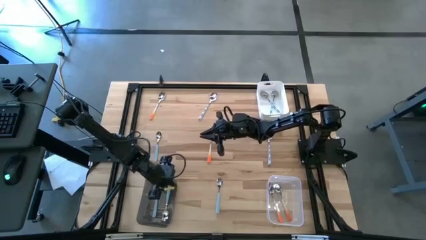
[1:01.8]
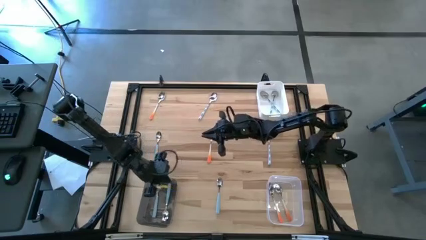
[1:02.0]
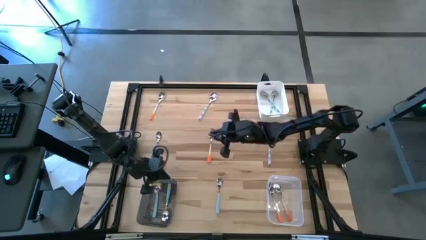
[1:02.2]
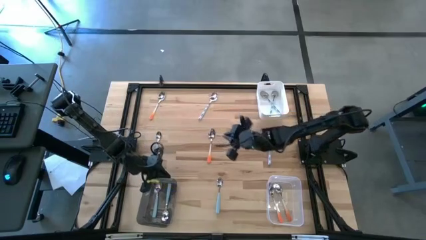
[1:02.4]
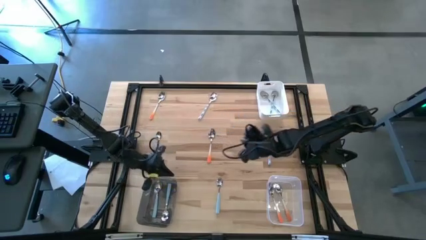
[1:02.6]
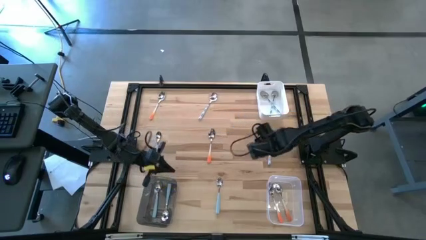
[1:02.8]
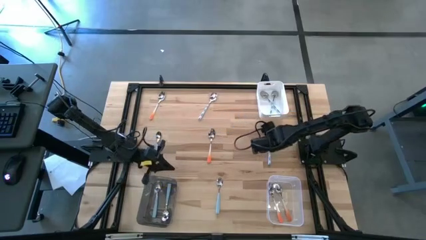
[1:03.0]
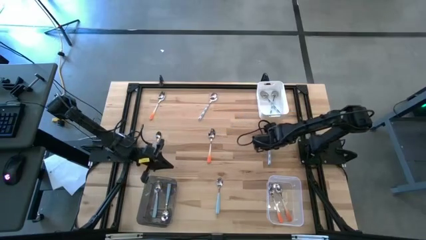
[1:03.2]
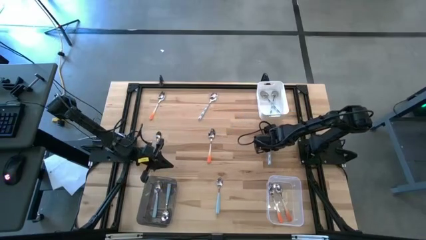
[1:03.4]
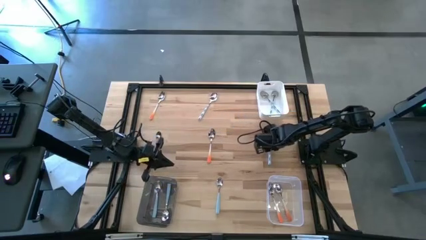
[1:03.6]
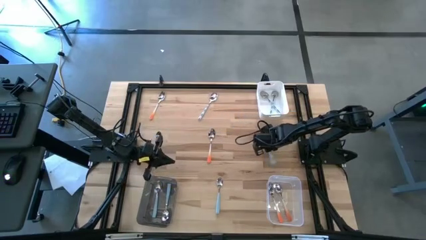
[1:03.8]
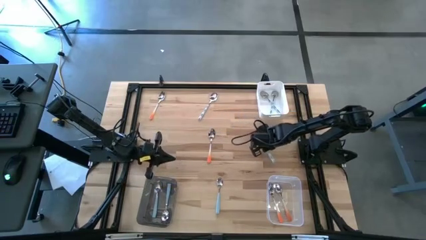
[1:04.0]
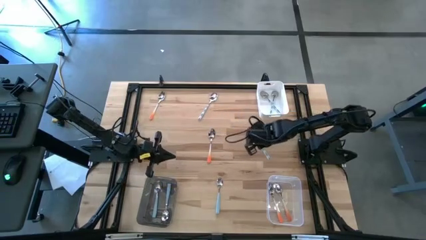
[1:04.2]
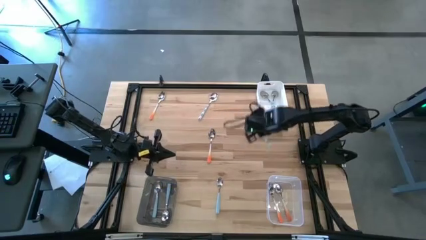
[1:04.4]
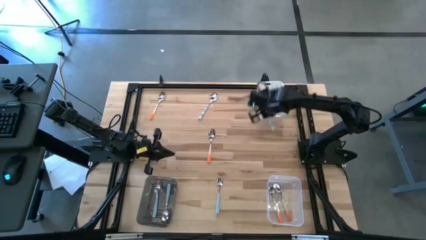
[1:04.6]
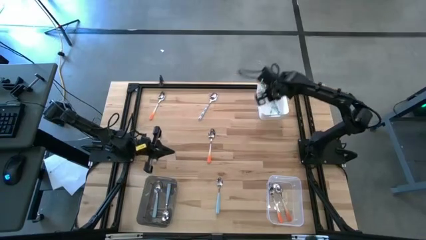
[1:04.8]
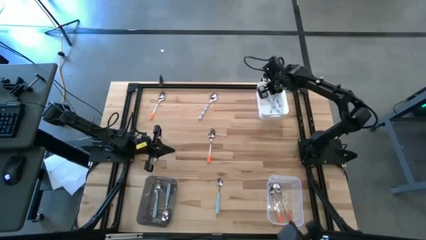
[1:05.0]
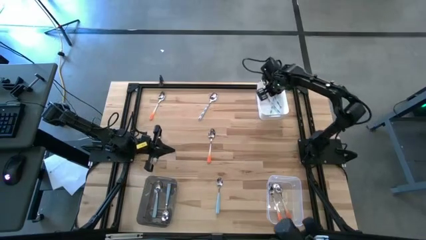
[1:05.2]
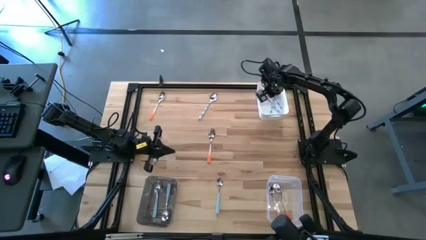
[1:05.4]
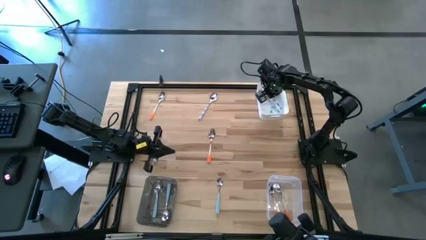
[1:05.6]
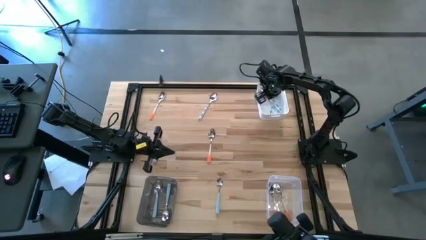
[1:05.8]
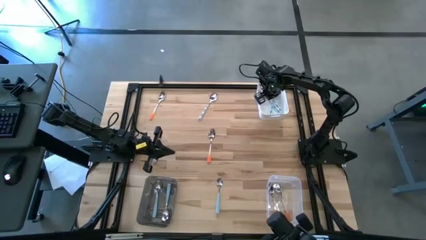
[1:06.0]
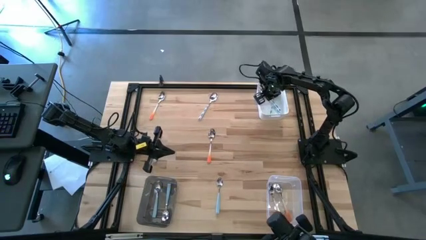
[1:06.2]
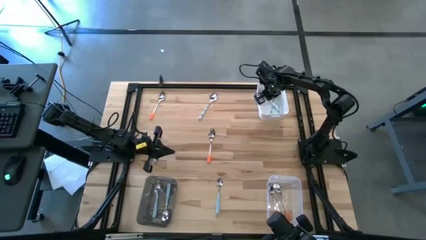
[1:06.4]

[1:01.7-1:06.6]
Task: Sort silverware by color (type)
Put the bottom white spoon into the white bin

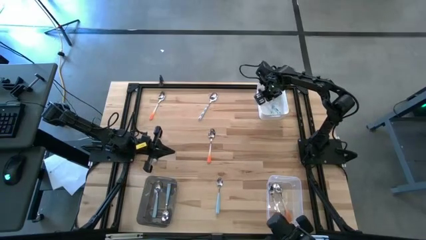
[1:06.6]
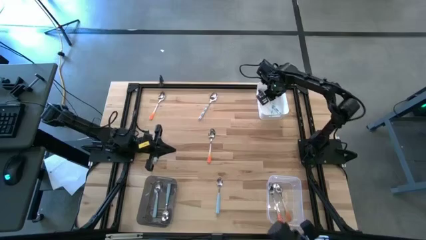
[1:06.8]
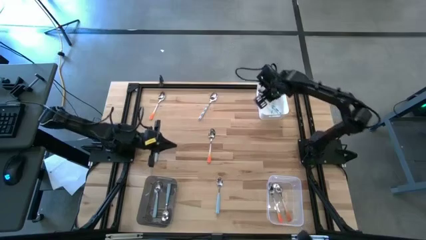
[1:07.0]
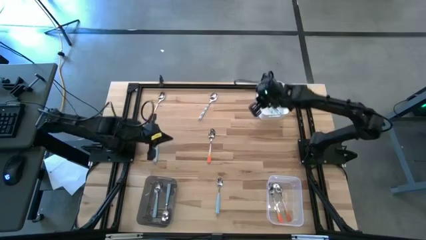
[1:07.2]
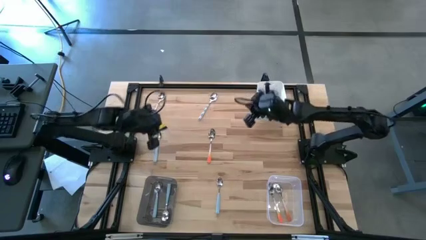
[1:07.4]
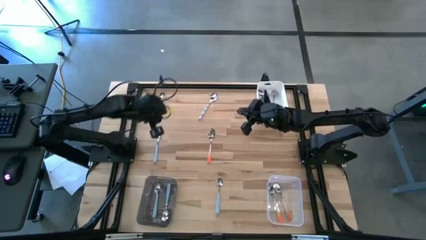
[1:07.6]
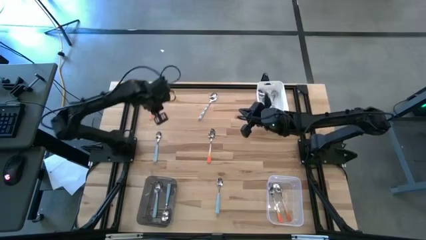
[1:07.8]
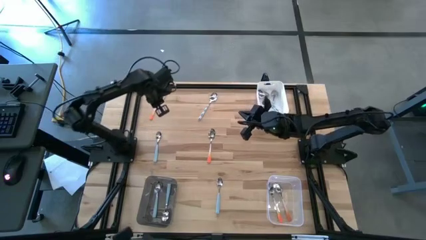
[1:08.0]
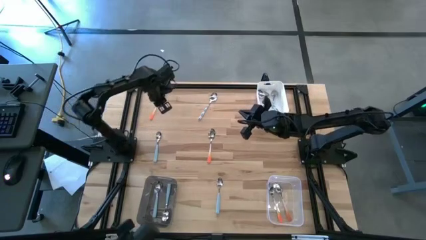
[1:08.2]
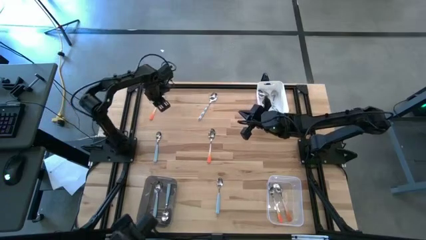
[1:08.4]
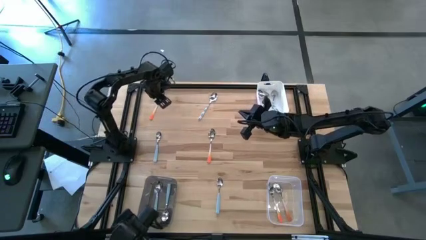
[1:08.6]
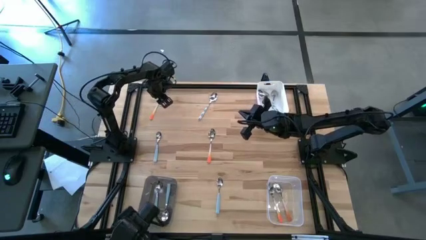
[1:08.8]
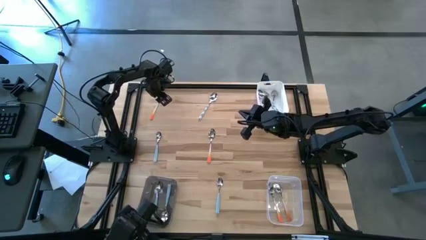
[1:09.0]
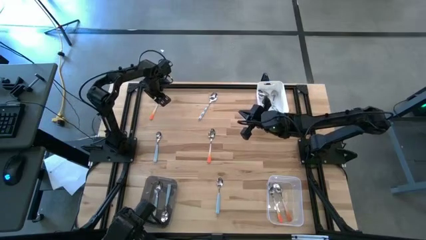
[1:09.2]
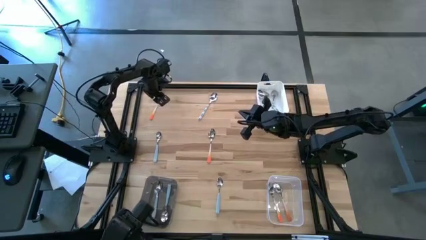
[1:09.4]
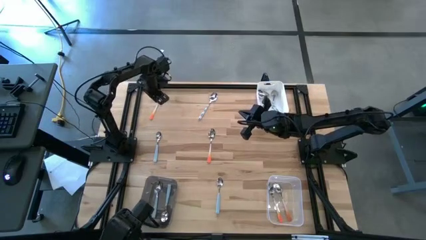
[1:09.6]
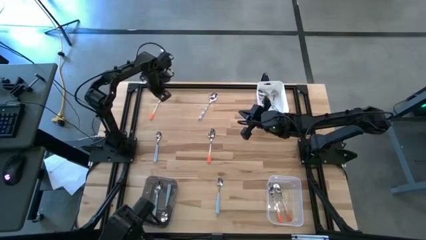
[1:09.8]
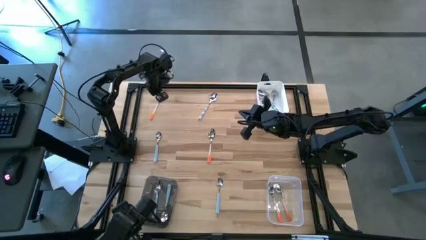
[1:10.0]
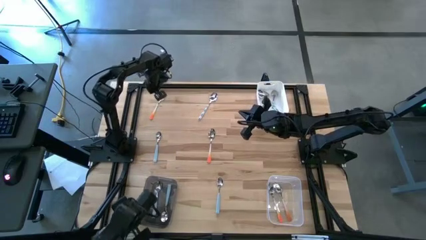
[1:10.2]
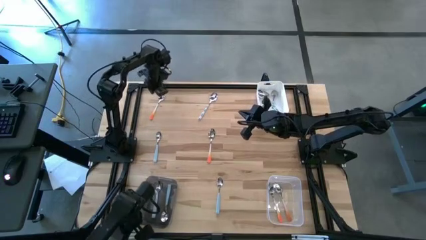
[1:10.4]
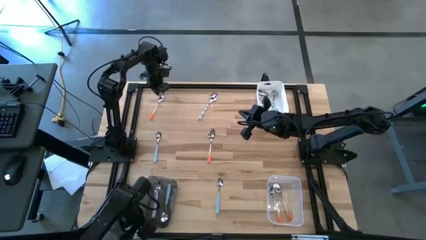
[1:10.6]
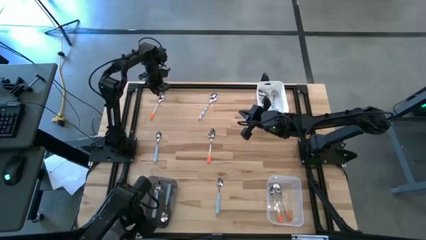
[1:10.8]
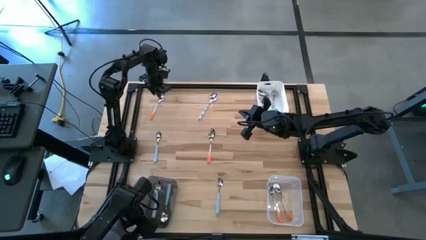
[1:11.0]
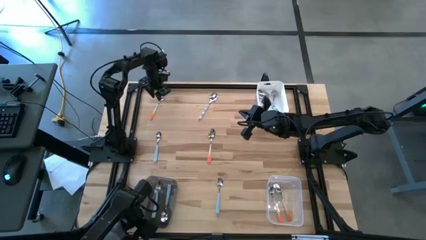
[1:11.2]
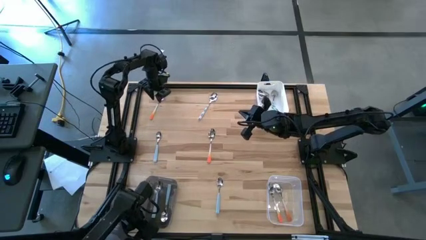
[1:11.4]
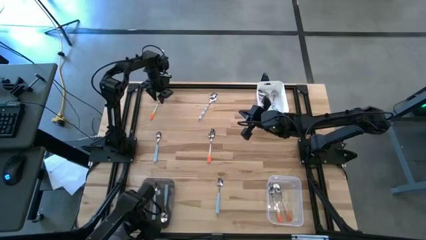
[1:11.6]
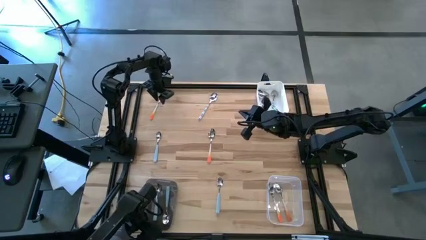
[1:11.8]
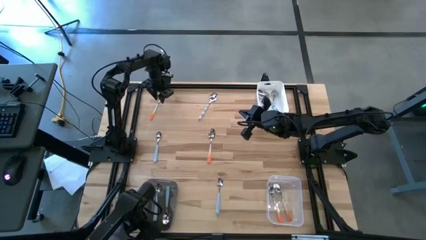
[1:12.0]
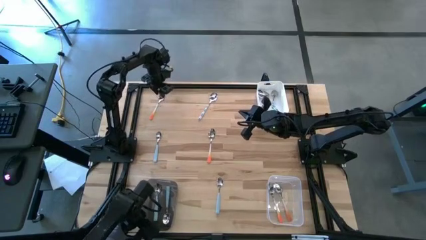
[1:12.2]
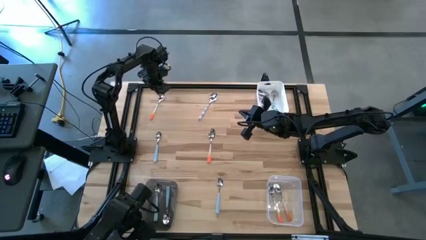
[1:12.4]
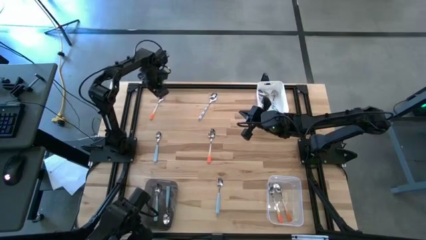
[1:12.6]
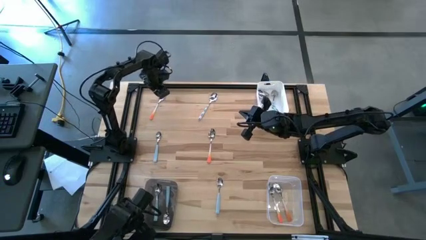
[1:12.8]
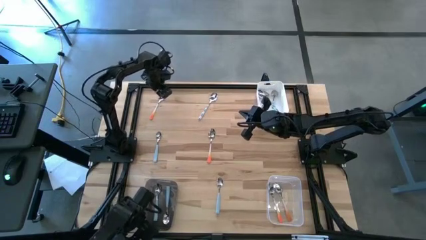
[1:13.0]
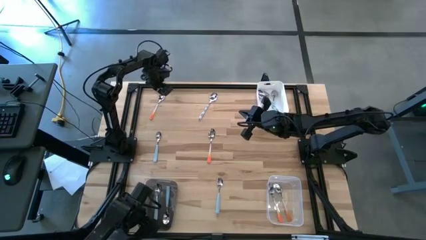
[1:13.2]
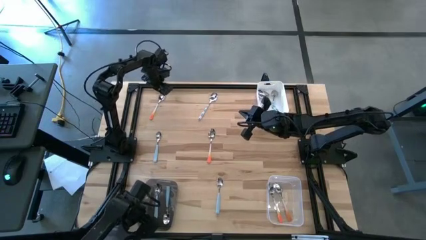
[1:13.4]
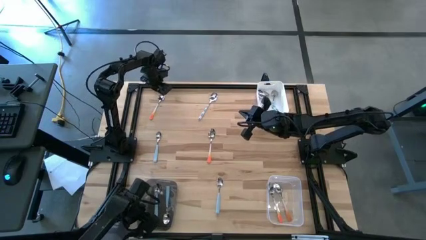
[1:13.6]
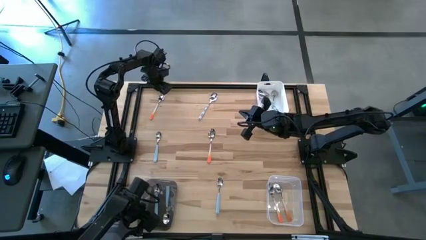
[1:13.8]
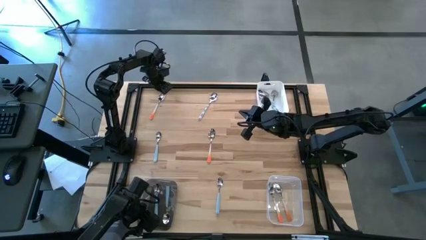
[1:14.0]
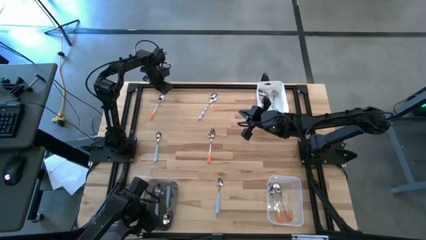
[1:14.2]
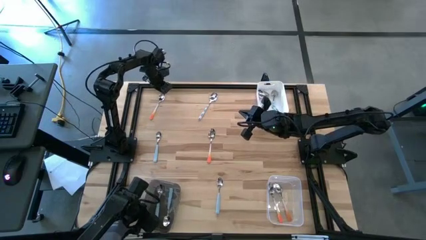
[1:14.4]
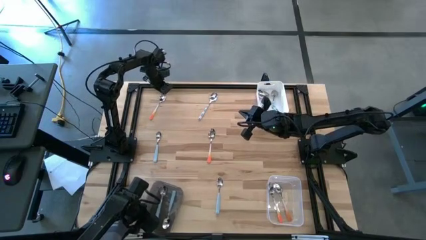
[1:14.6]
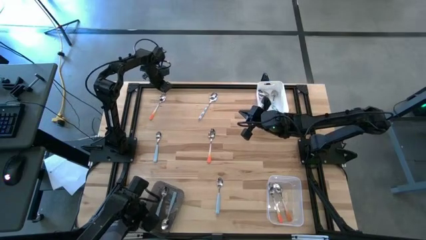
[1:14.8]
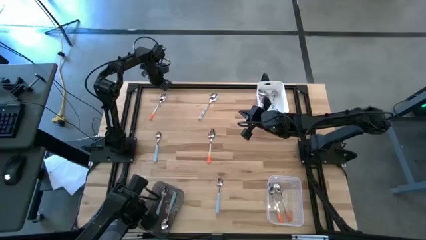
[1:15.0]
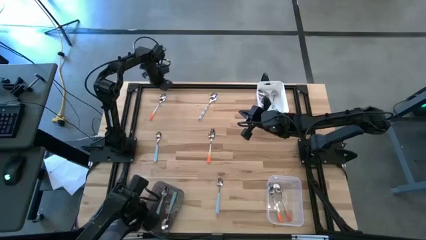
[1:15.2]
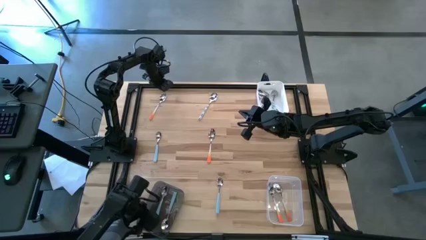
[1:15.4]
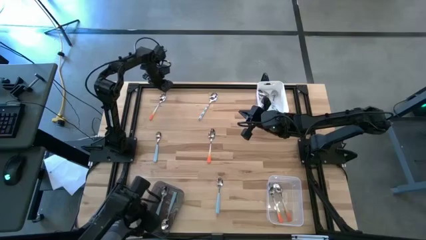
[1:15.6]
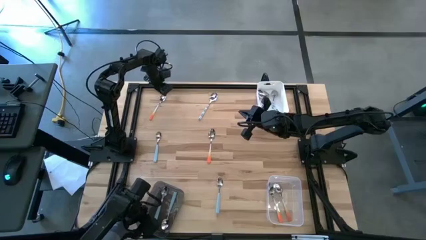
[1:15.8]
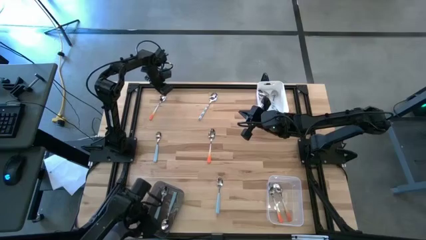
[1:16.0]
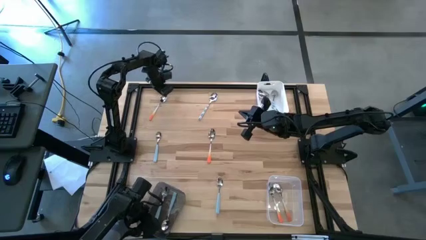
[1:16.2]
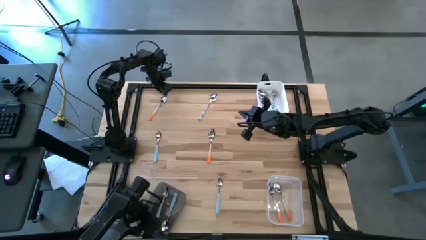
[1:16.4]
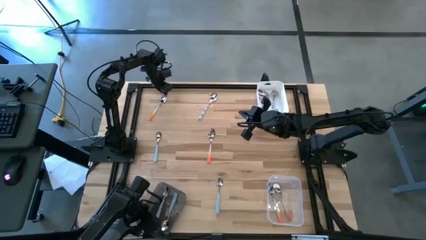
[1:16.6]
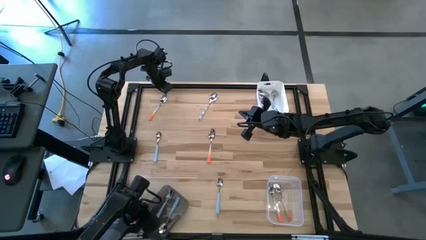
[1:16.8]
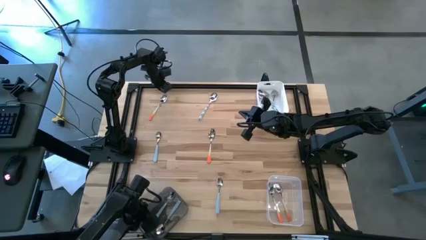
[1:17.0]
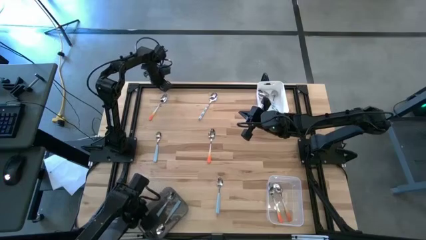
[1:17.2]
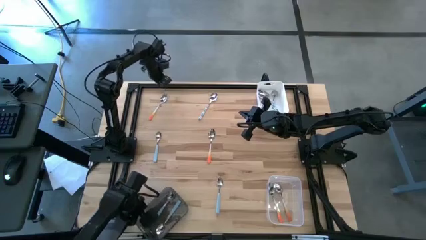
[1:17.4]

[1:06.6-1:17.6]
Put the top orange spoon into the transparent bin
